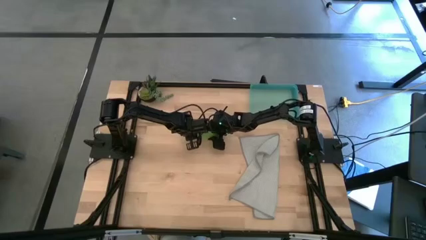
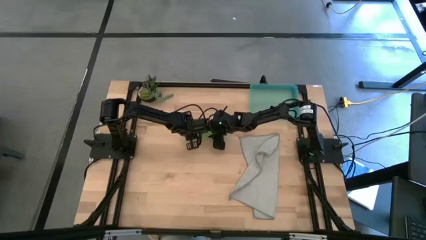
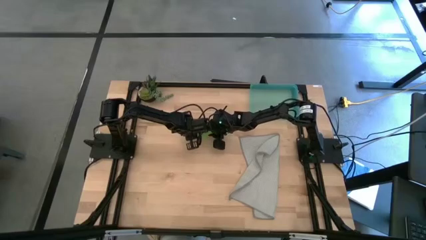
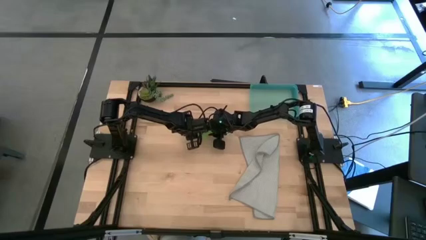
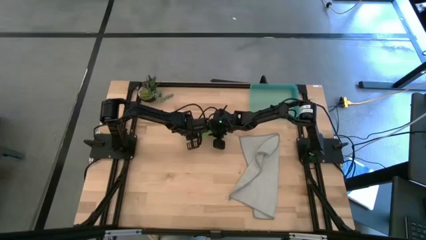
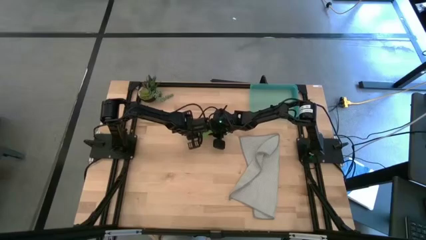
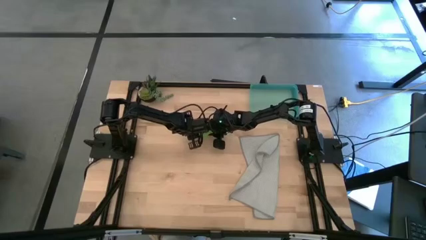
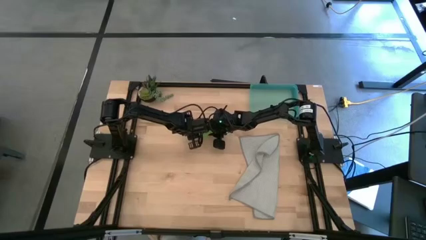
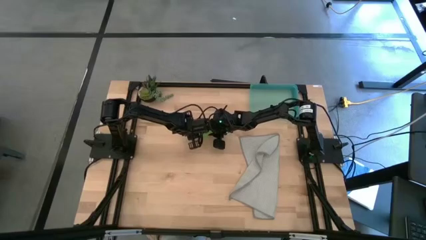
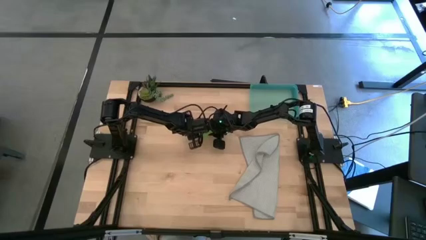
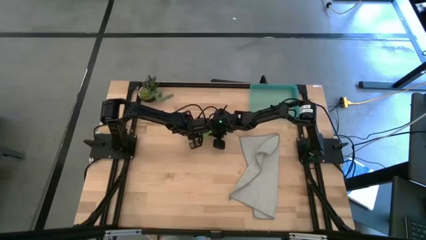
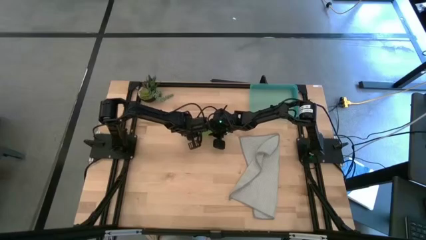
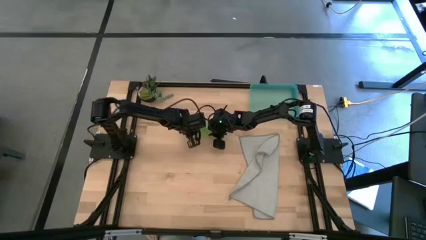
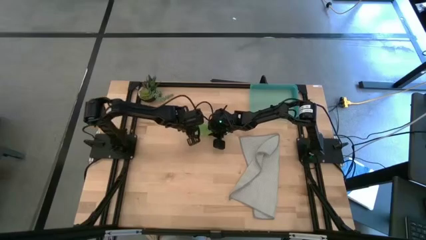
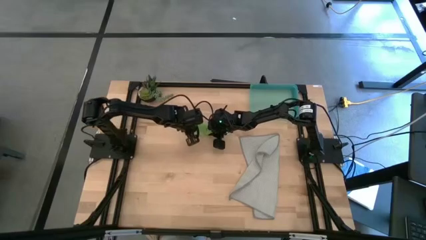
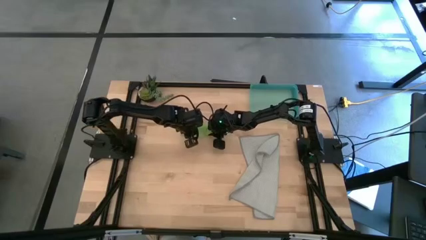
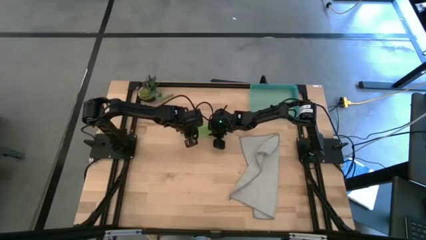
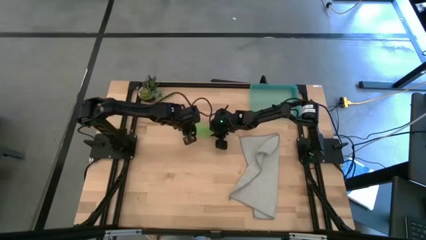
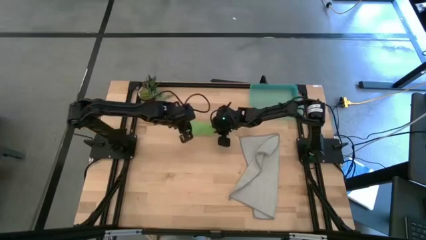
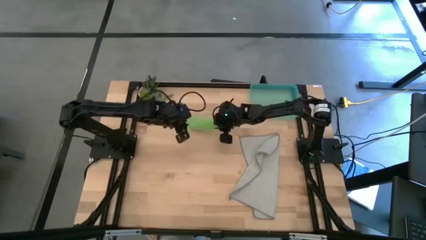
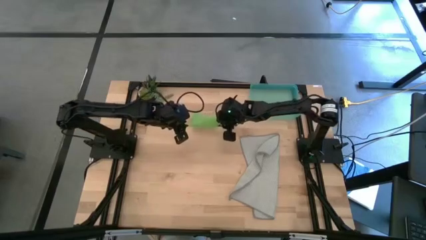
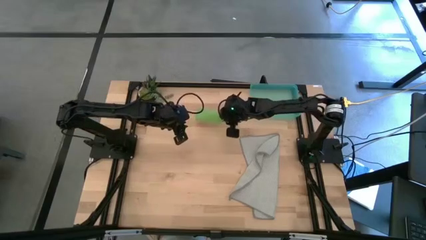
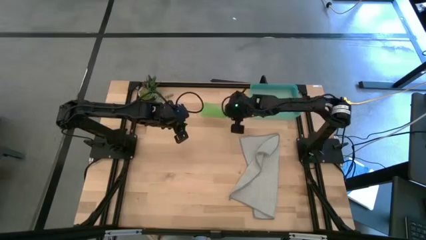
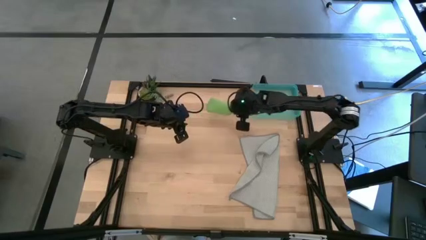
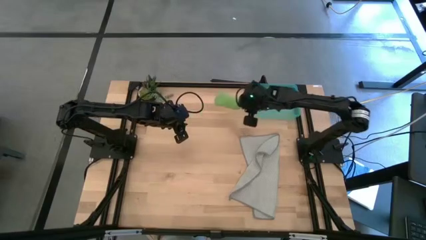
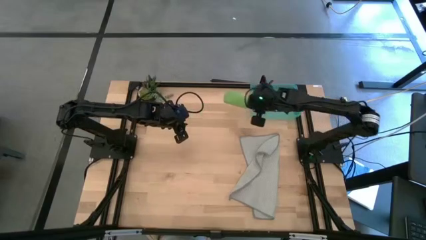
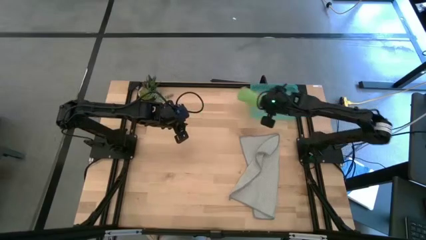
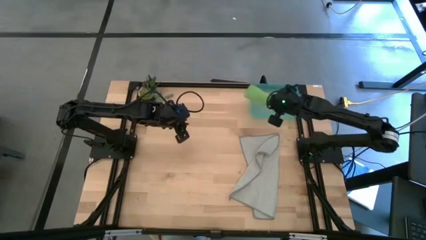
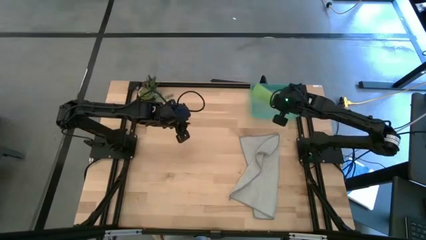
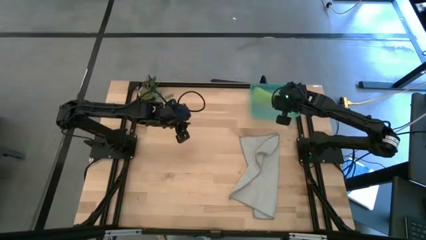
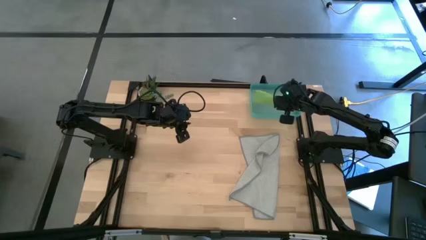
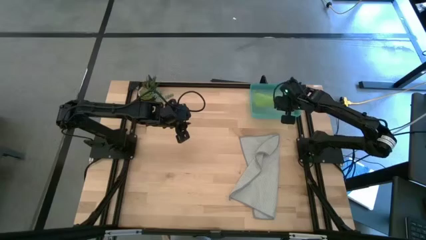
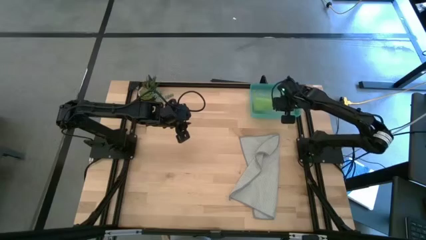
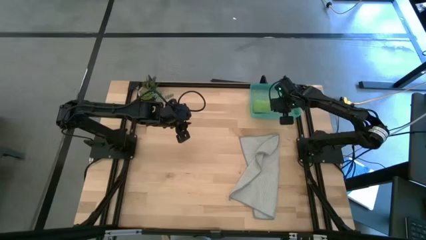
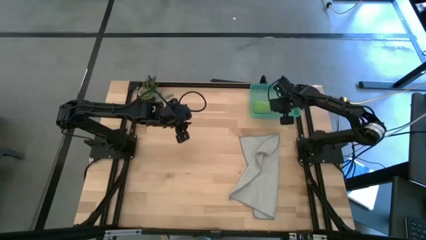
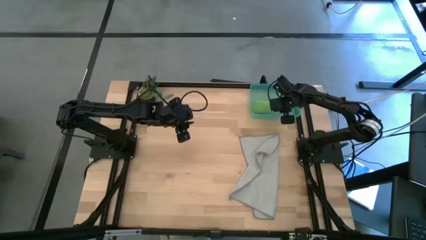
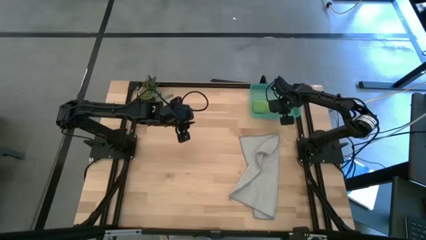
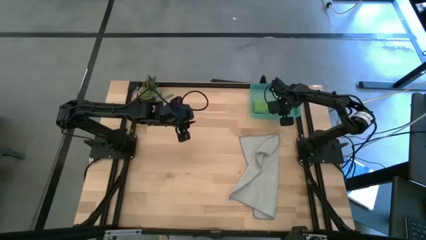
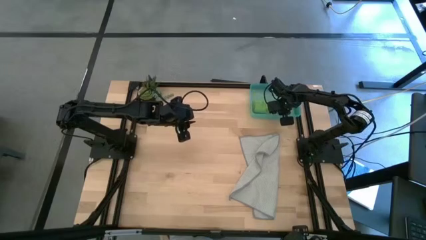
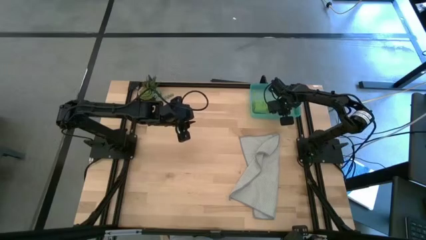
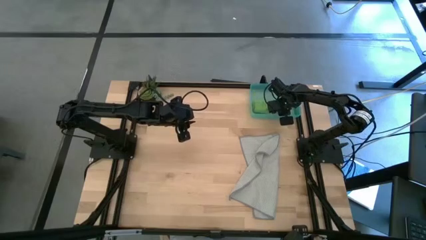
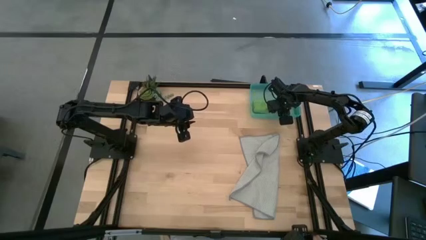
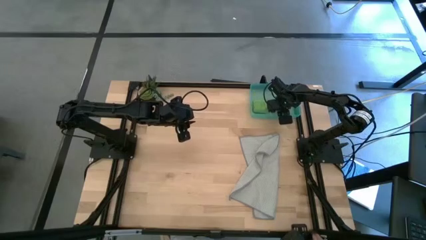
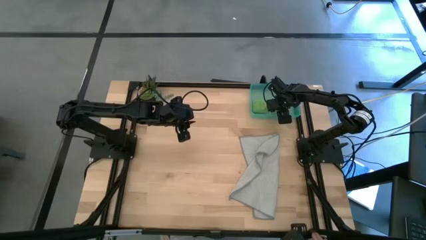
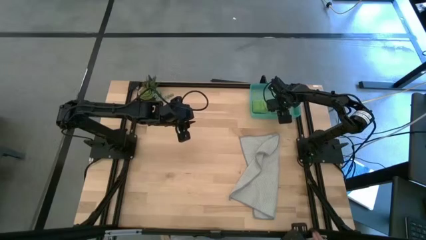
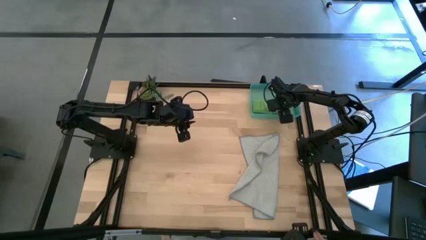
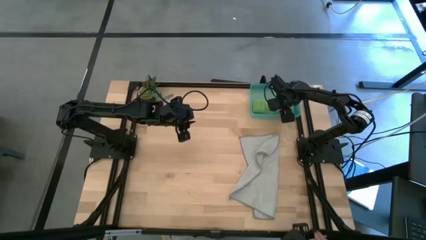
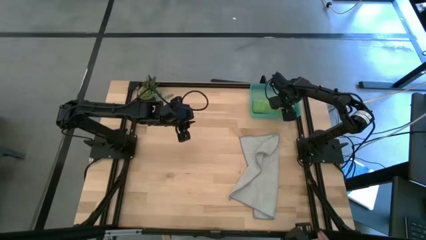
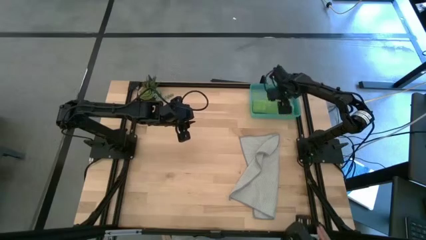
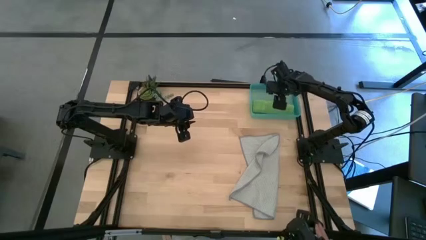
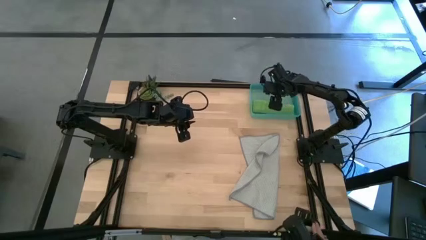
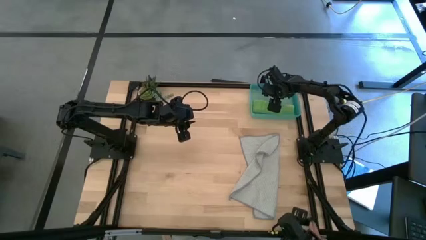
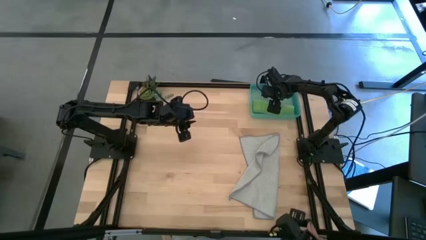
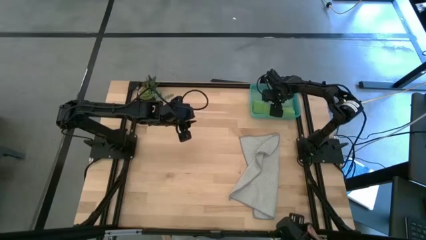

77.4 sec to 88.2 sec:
Task: Roll microfiber towels into tight, uniform cylinder then place into a basket
Put the green microfiber cloth into the blue bin
